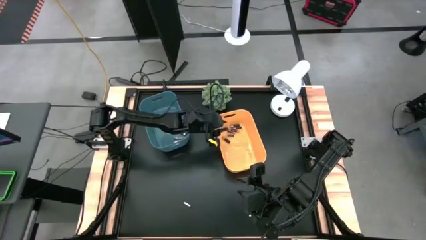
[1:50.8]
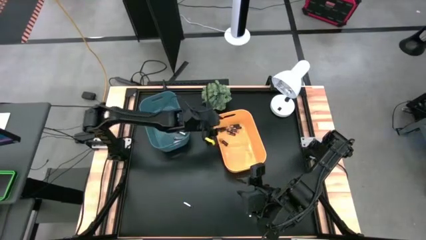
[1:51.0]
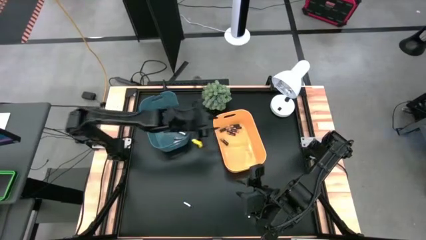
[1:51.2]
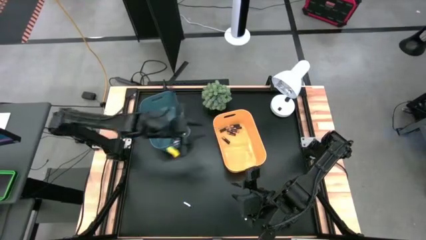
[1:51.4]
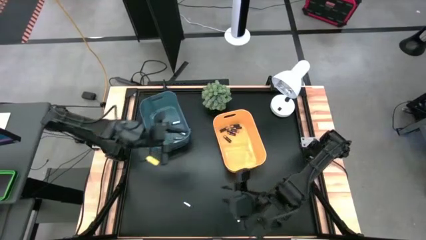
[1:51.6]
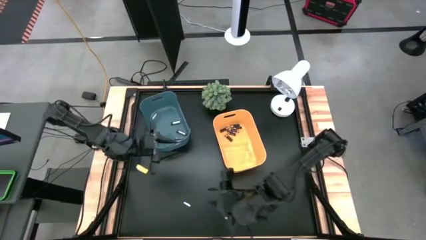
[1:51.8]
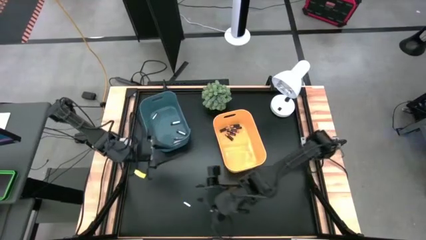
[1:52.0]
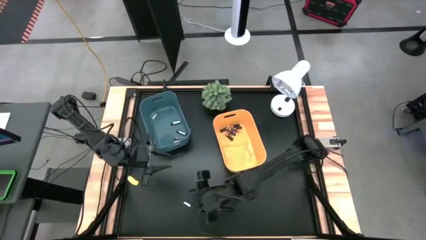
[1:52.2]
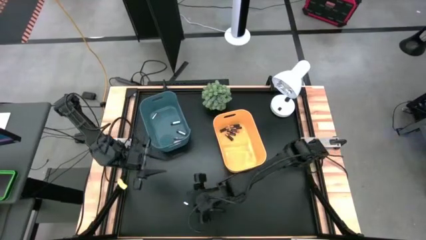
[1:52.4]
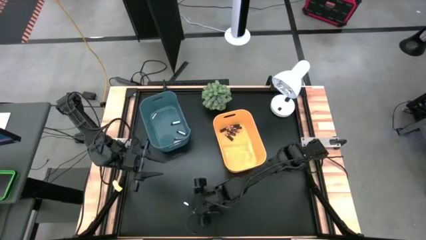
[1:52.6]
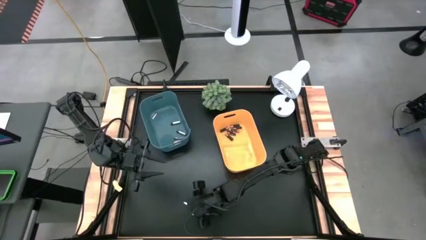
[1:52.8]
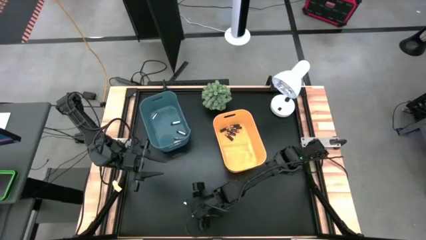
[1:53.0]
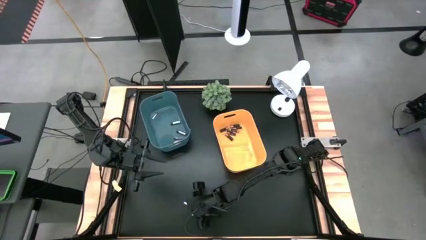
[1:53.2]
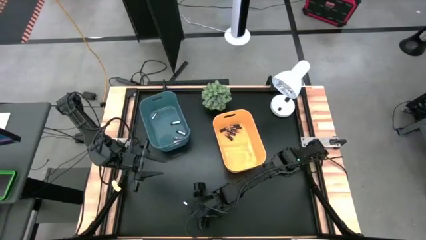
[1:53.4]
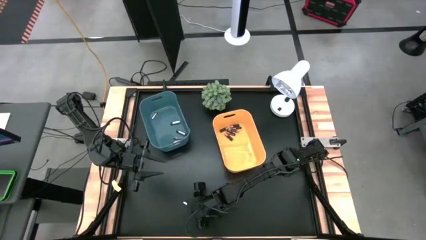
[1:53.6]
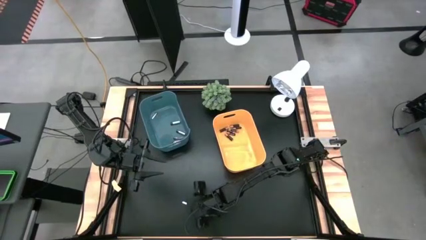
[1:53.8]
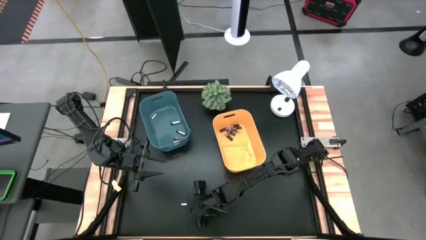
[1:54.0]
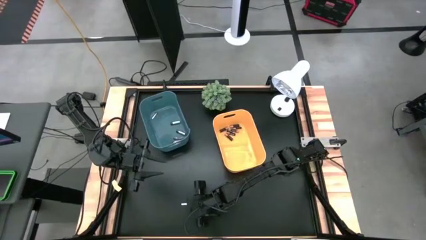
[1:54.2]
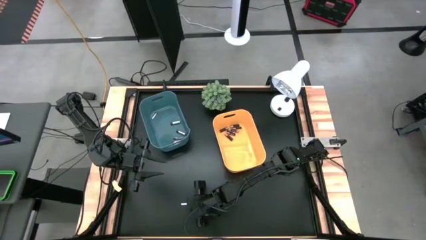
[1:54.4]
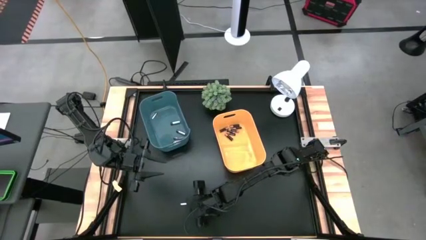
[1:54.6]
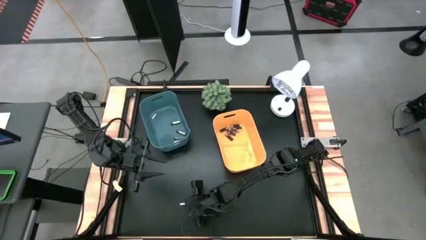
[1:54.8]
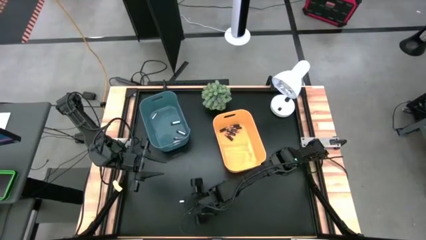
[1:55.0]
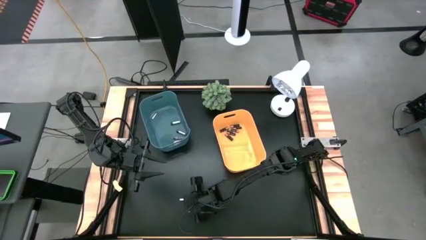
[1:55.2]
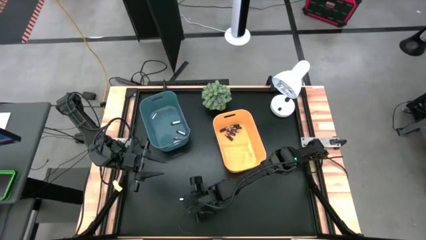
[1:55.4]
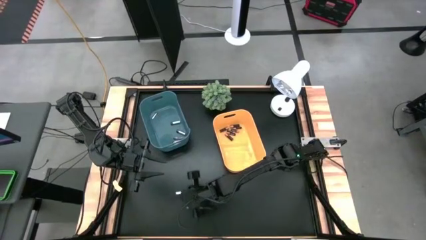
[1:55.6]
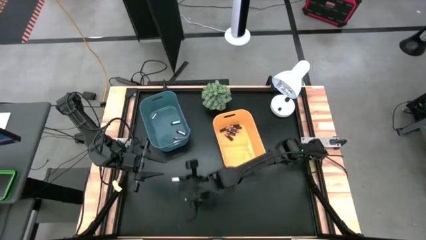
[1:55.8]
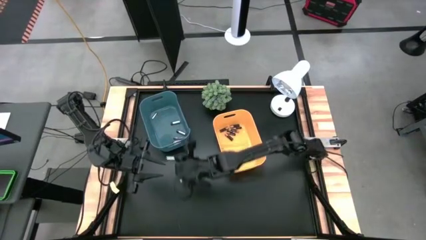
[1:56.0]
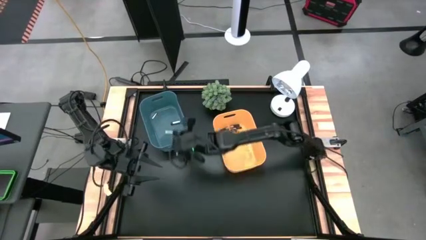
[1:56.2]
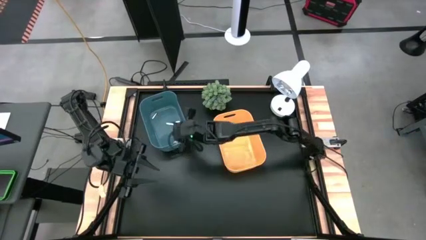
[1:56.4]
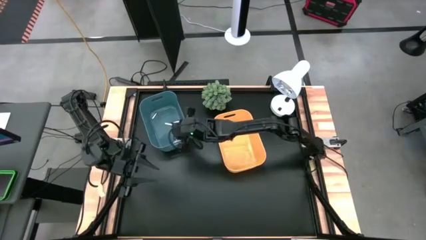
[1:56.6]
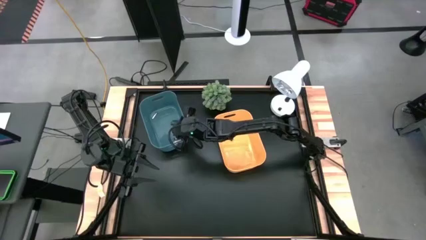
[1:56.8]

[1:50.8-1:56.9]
Task: Sort batteries
Put the silver battery into the blue bin

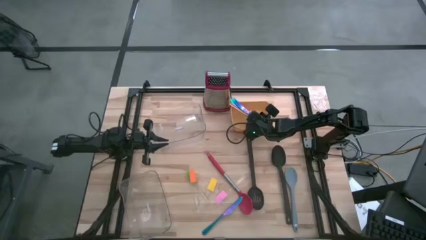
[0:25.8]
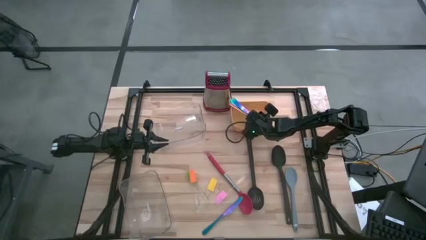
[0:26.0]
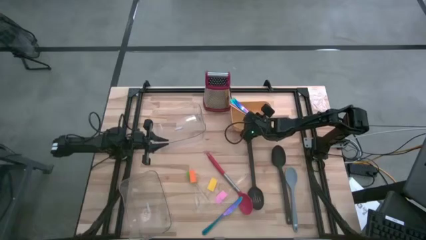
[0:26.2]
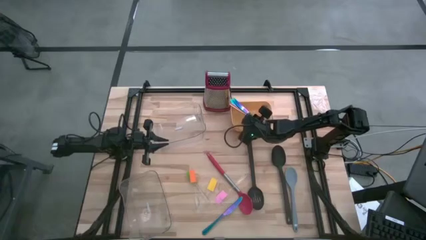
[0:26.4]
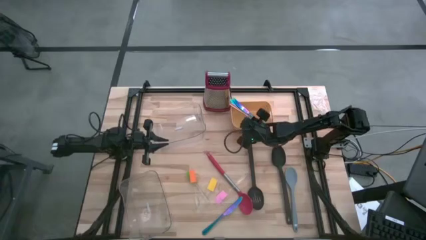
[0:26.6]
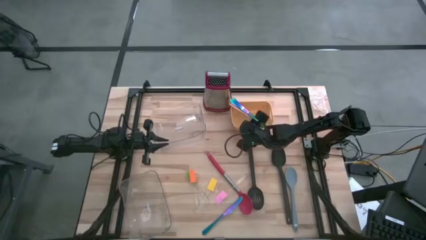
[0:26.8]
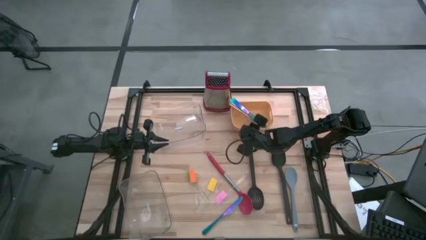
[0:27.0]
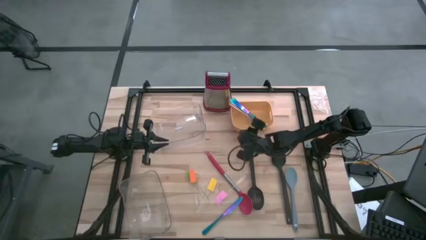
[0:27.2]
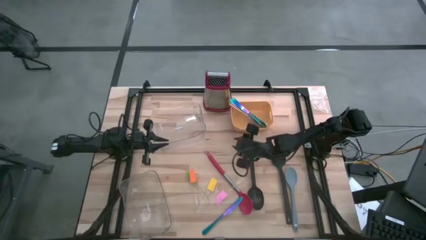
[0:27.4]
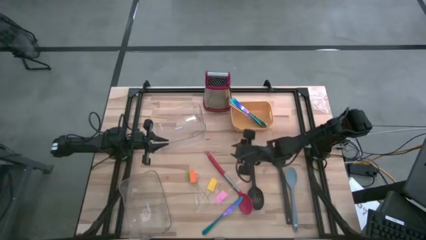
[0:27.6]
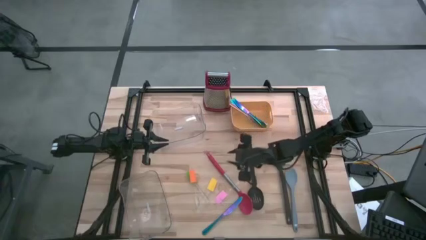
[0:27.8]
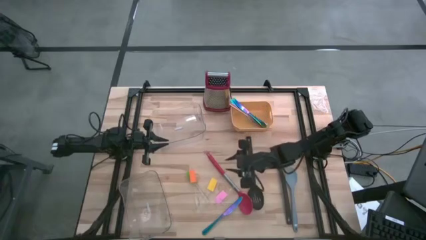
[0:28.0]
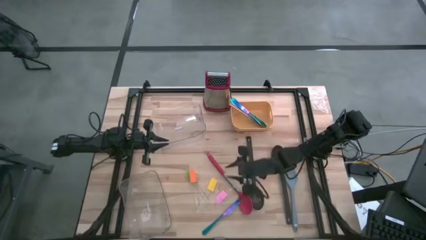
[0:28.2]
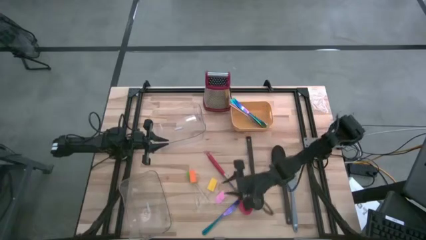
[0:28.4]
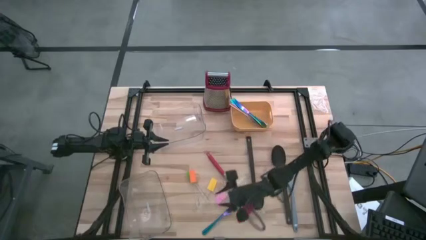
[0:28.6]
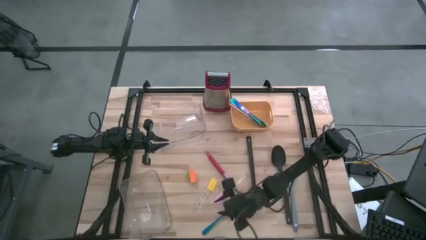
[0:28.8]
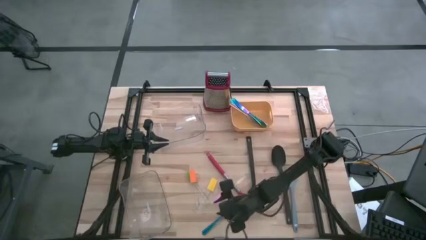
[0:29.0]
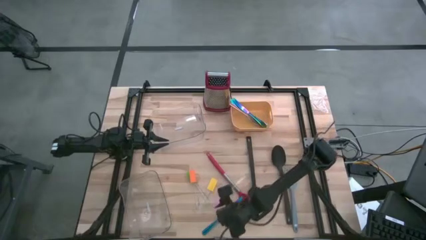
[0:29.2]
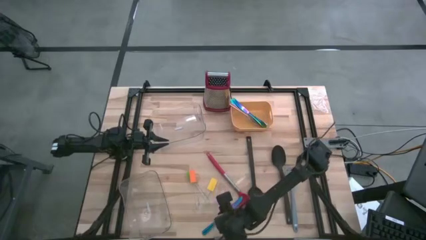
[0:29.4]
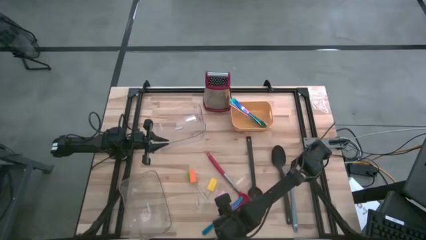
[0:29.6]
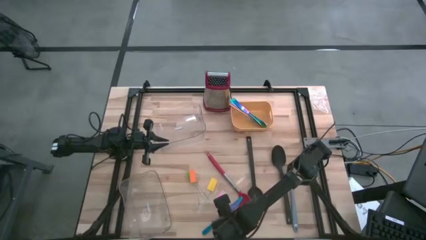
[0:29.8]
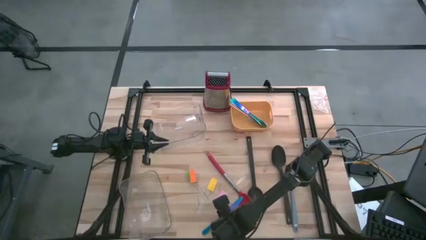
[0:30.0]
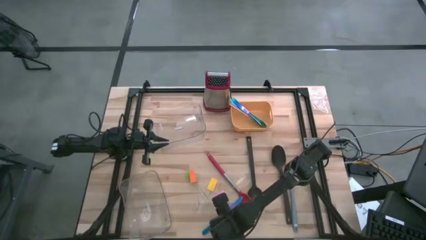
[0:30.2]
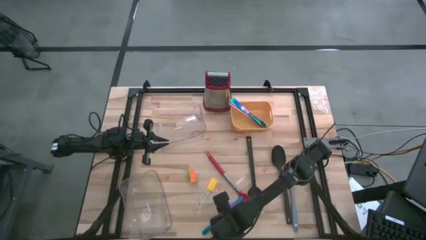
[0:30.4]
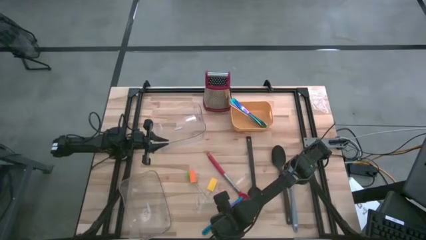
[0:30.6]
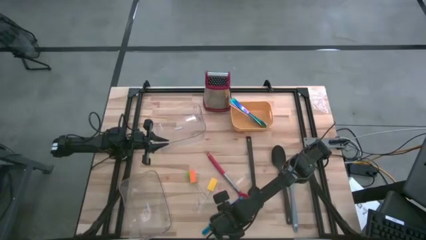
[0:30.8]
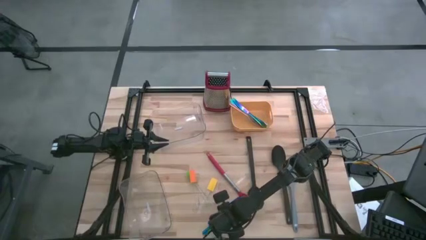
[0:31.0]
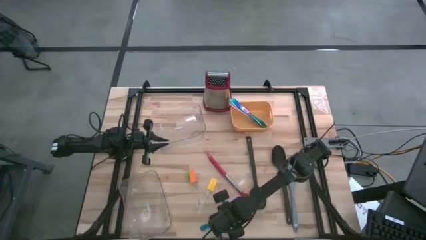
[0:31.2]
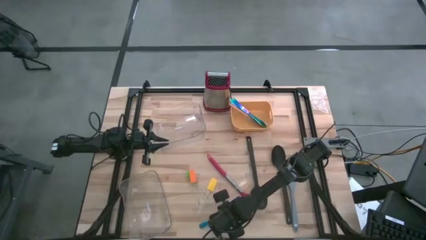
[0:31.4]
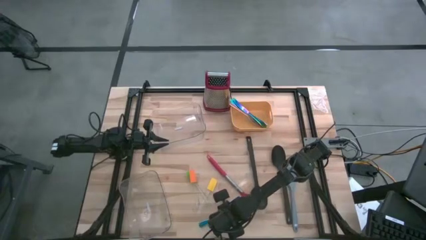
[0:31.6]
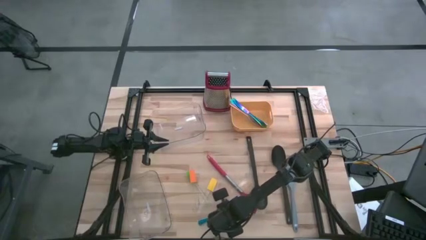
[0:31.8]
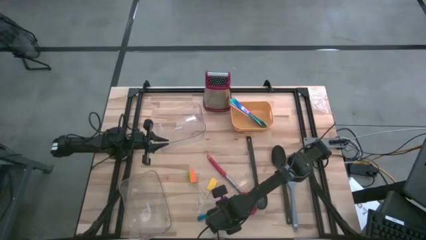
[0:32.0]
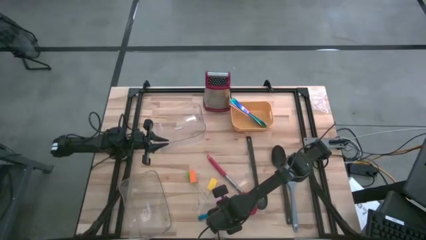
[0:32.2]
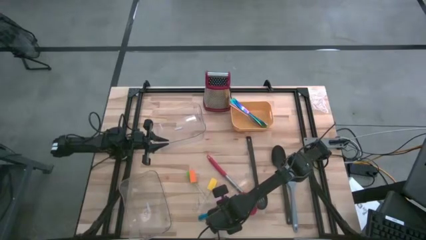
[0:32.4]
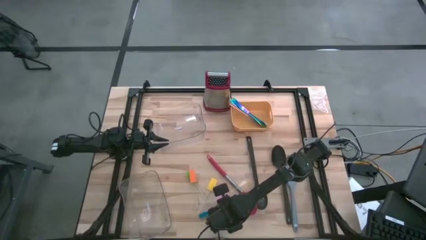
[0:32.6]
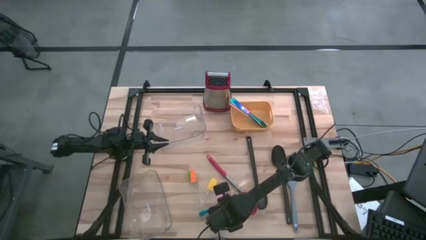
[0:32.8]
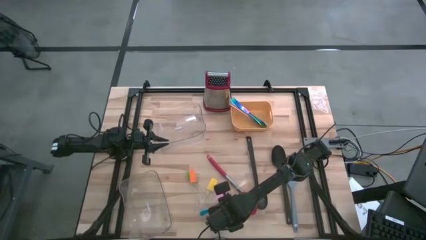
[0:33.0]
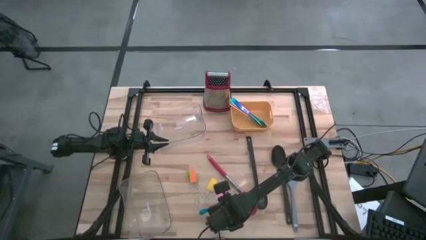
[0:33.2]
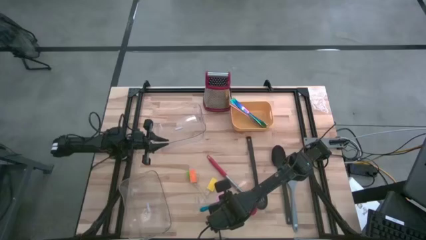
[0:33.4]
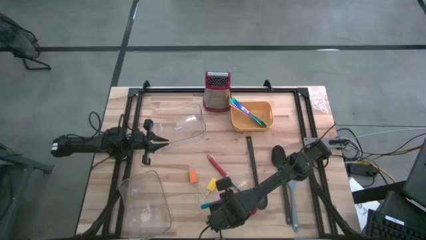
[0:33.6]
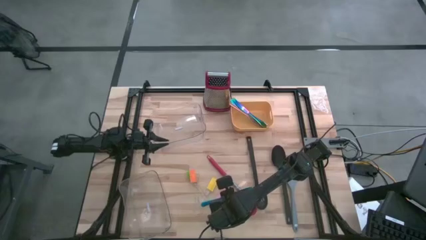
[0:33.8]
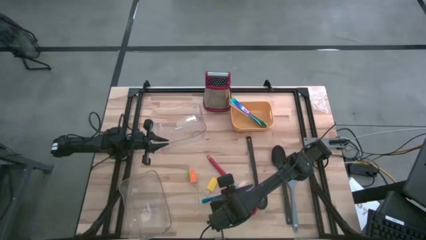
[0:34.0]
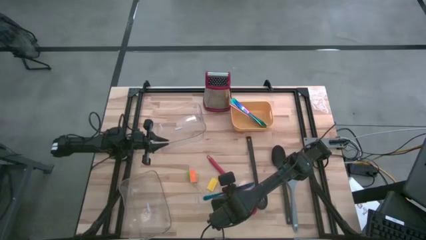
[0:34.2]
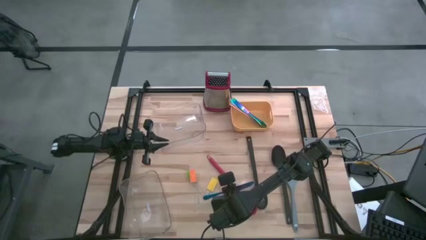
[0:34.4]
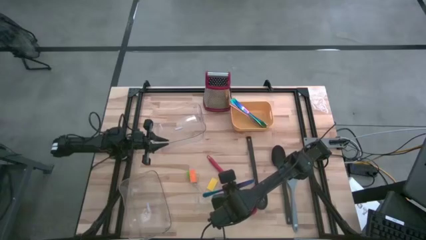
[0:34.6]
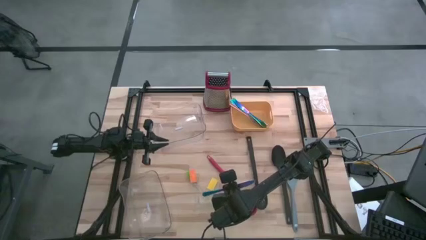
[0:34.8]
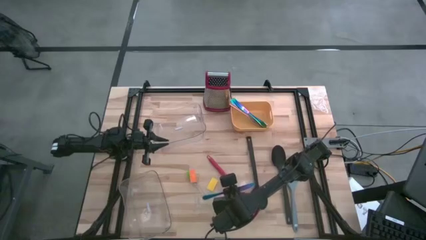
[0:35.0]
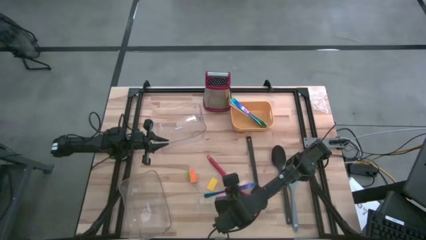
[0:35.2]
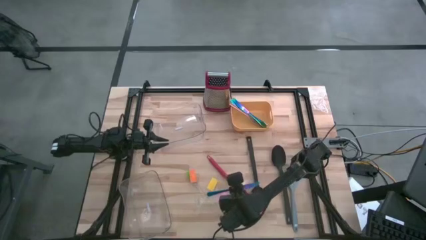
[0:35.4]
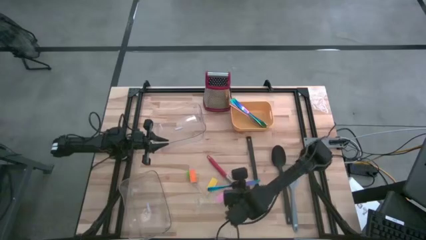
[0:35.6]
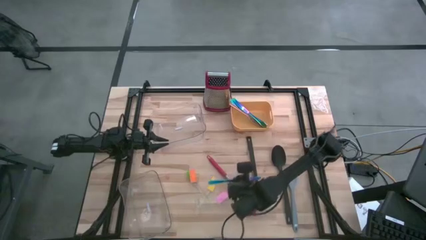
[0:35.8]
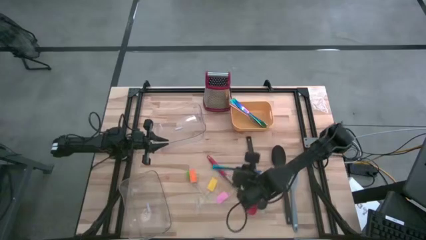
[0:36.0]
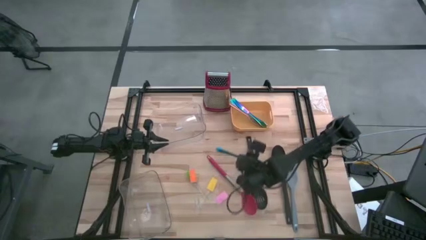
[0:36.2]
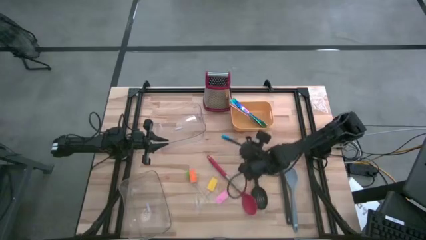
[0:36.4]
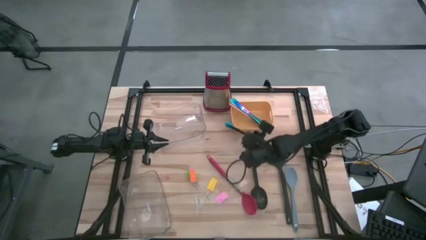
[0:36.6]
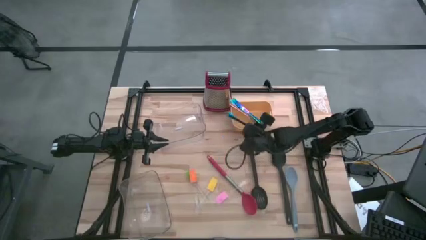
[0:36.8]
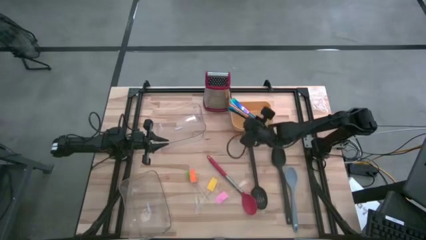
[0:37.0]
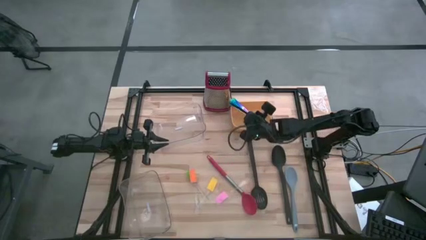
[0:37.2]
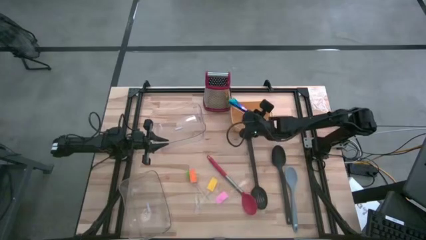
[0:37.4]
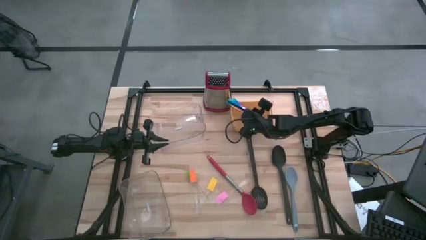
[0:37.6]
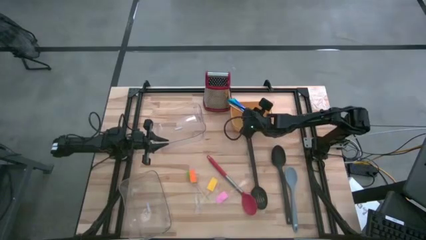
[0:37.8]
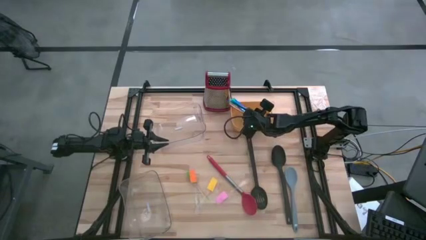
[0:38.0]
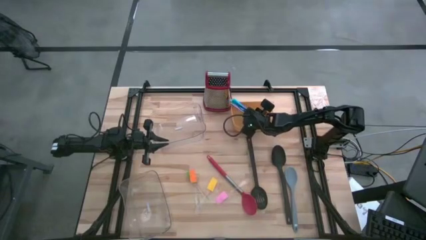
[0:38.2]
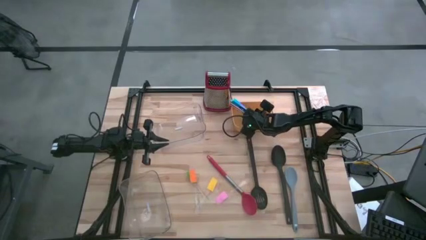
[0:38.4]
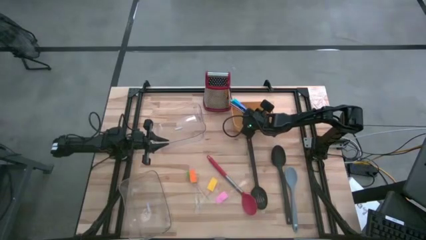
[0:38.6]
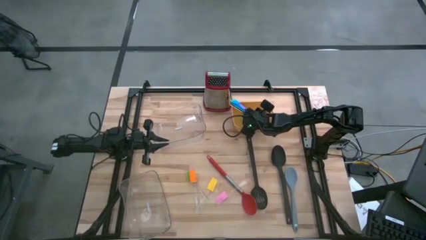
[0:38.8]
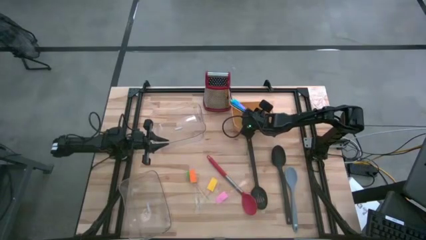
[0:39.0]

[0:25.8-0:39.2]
Task: Pick & Place Kitchen Items
Put the blue knife into the yellow bin
